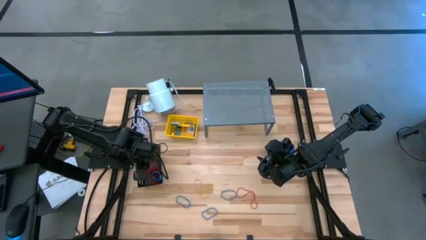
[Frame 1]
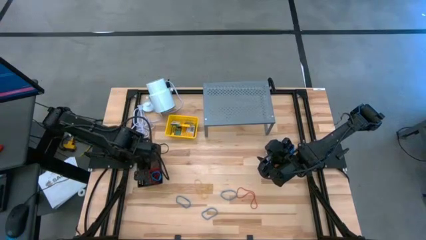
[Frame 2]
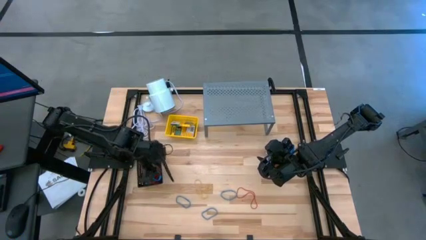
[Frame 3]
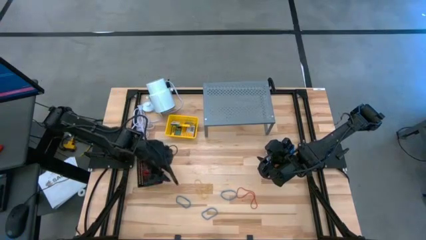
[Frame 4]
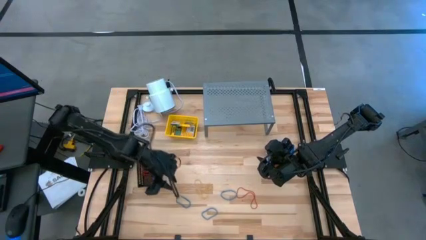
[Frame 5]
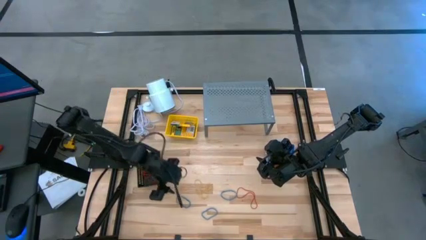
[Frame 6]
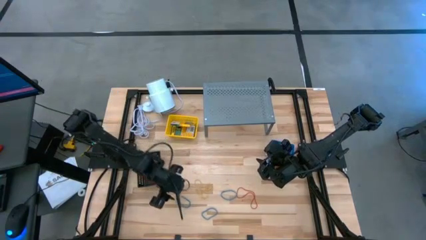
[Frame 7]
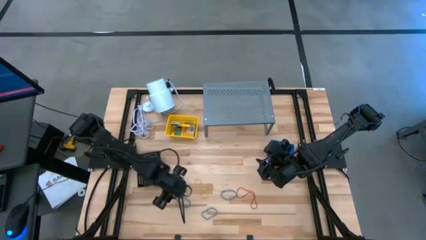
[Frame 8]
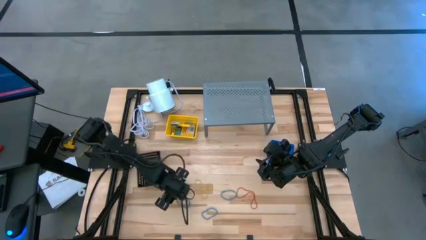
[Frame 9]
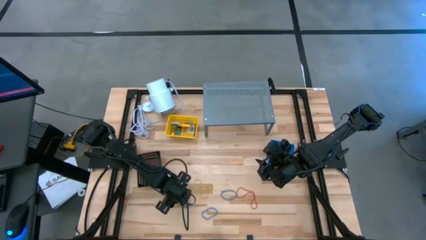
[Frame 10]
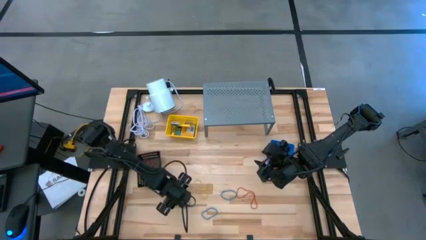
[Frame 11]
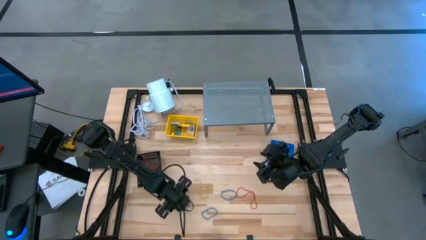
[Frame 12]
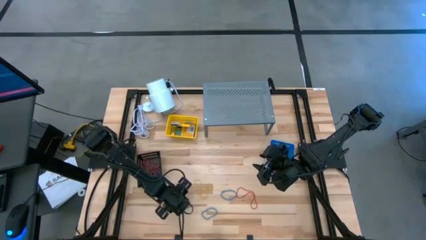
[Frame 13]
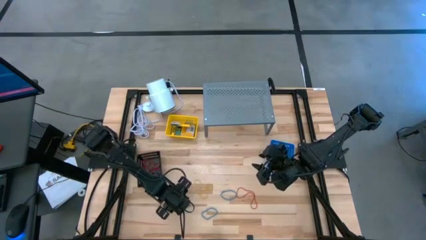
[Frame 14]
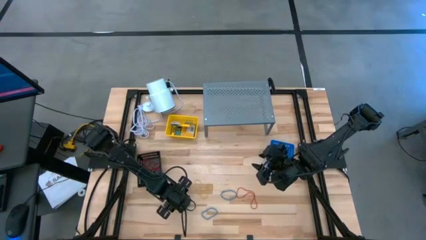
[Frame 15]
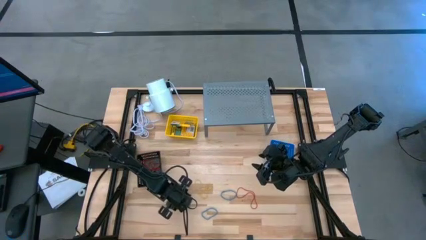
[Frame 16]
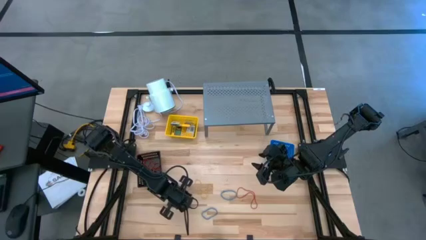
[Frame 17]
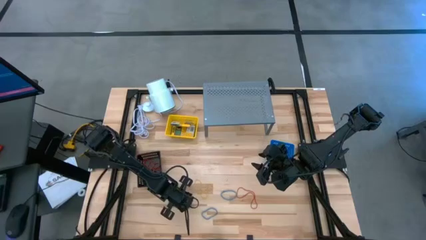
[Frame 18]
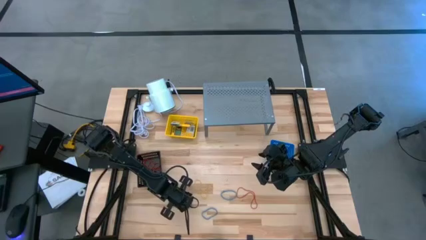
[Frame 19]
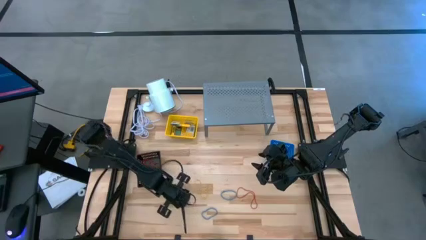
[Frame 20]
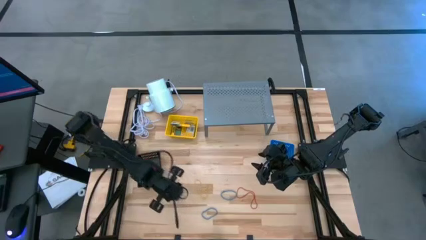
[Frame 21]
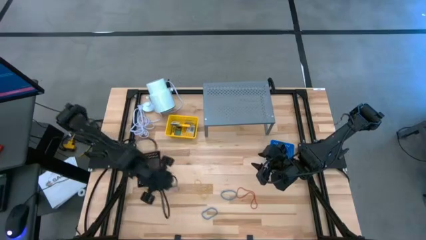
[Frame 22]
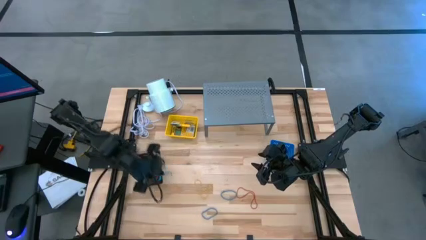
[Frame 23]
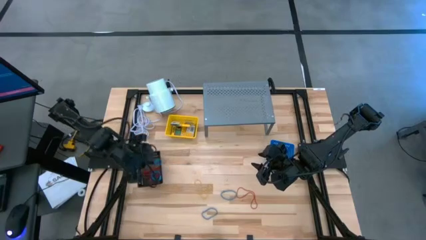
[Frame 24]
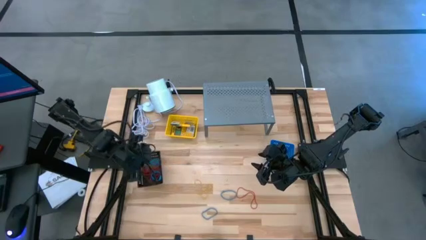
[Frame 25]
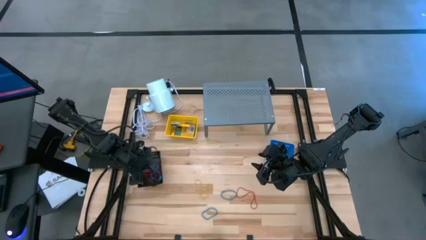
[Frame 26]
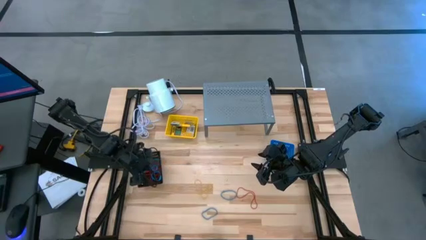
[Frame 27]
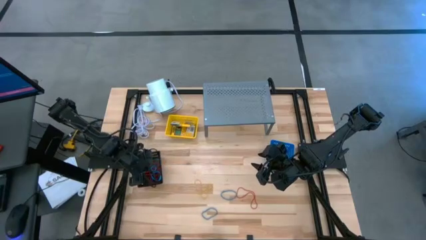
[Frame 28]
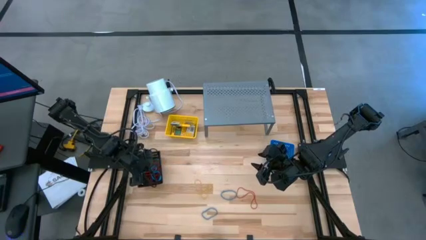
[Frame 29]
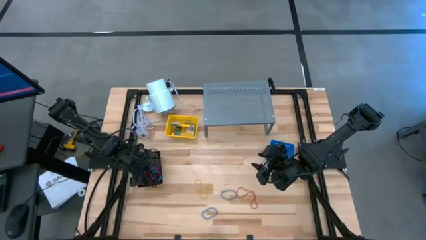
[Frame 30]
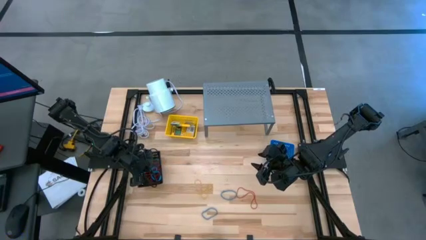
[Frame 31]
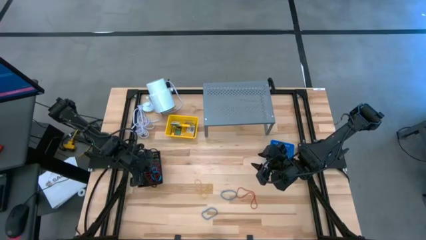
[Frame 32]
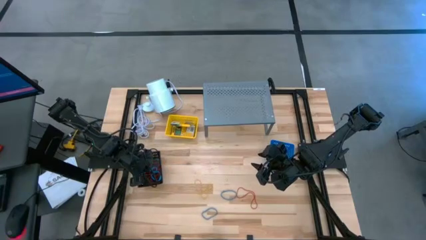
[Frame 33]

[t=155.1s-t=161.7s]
Task: Pick & Place Office Desk Supplies
Put the blue rubber band into the black bin

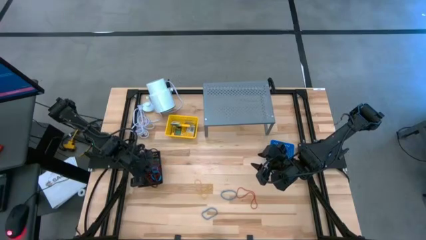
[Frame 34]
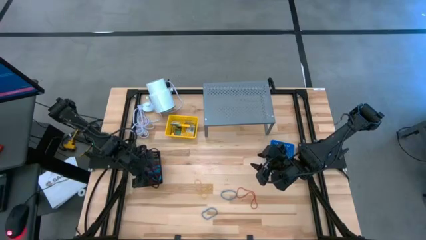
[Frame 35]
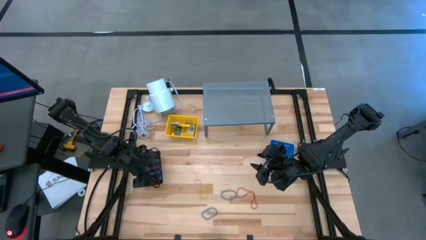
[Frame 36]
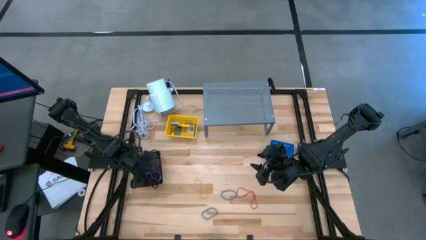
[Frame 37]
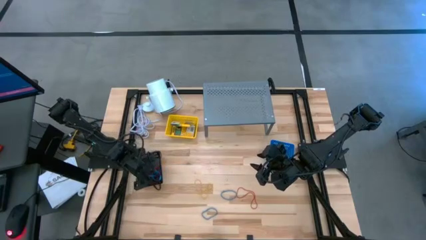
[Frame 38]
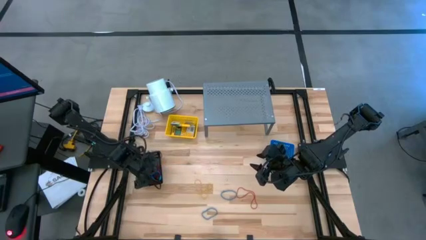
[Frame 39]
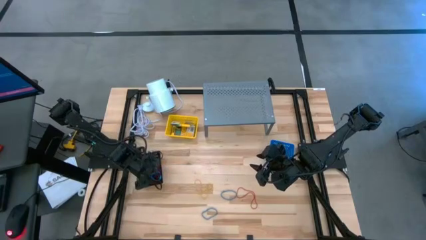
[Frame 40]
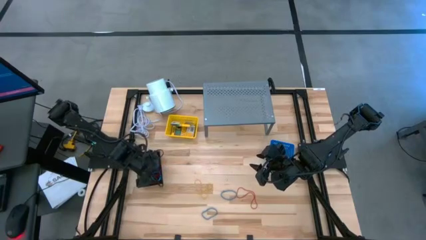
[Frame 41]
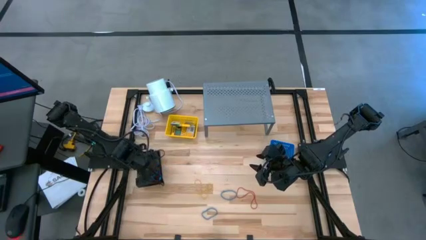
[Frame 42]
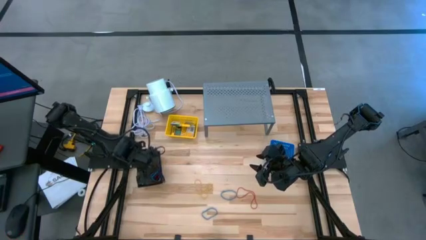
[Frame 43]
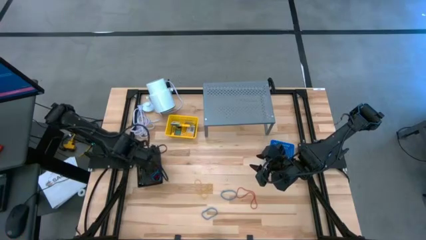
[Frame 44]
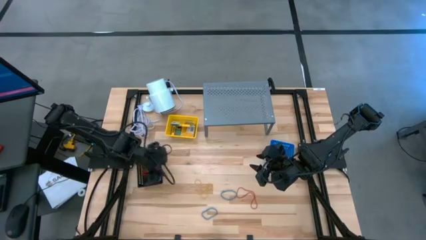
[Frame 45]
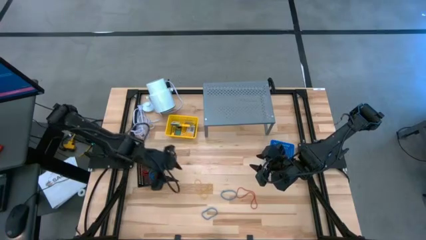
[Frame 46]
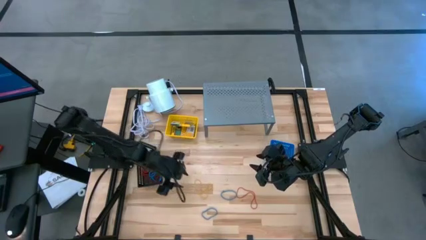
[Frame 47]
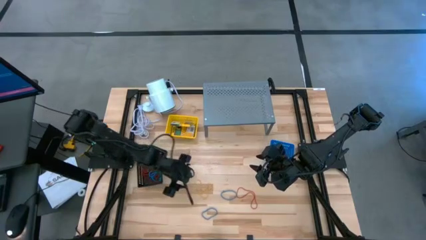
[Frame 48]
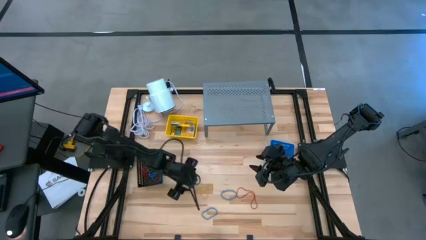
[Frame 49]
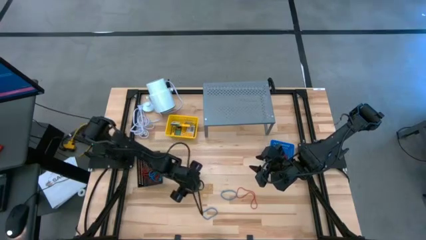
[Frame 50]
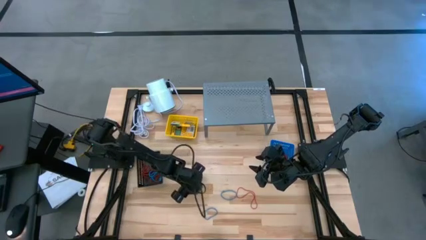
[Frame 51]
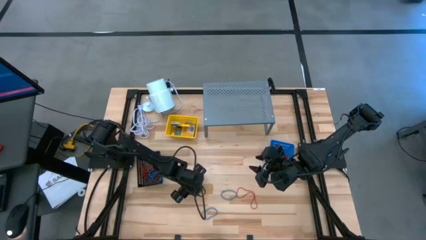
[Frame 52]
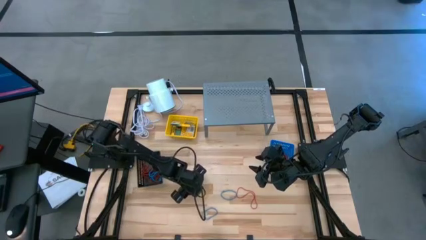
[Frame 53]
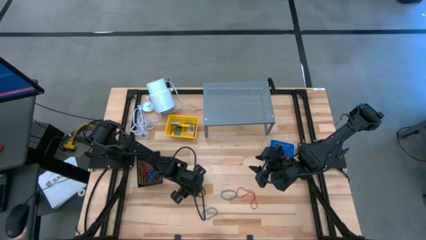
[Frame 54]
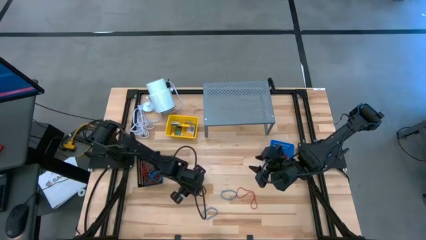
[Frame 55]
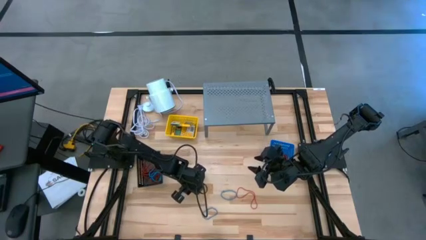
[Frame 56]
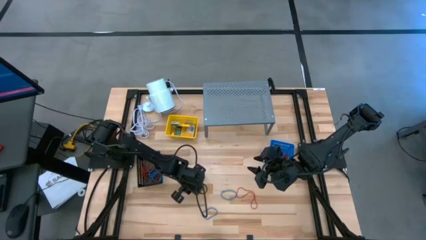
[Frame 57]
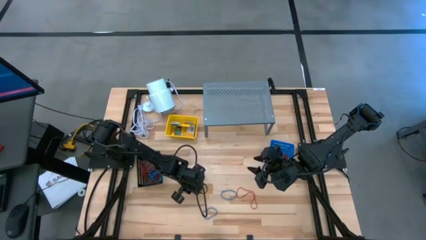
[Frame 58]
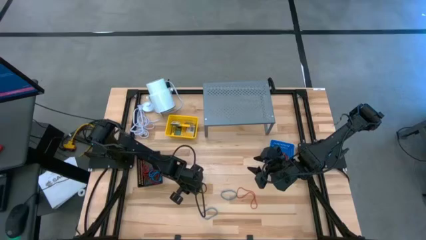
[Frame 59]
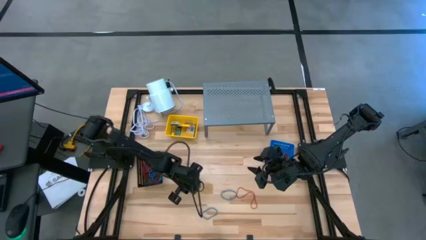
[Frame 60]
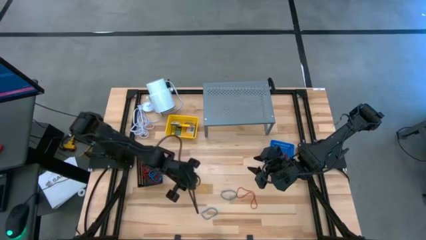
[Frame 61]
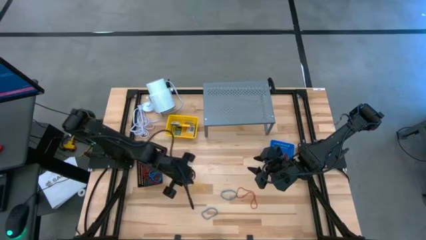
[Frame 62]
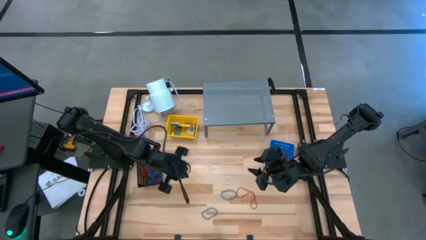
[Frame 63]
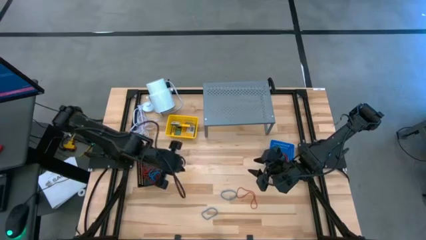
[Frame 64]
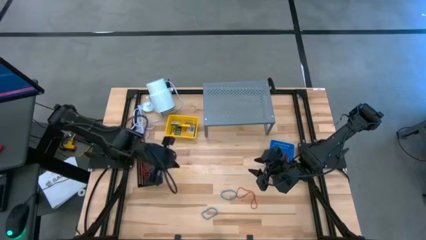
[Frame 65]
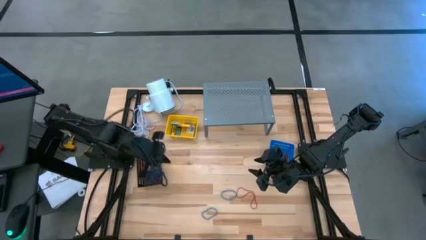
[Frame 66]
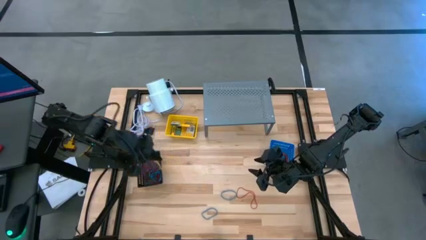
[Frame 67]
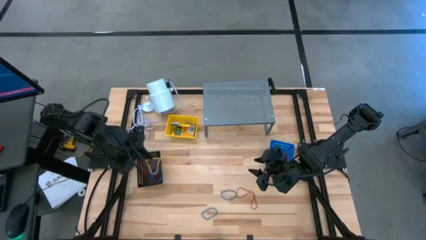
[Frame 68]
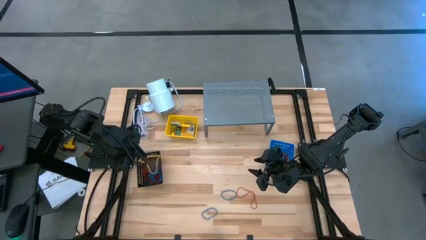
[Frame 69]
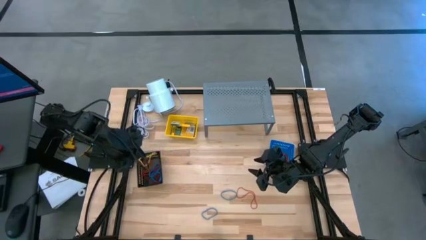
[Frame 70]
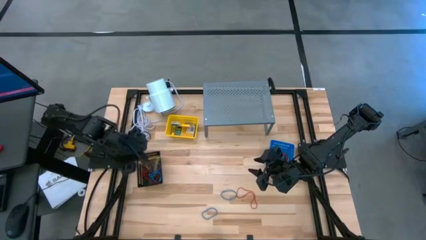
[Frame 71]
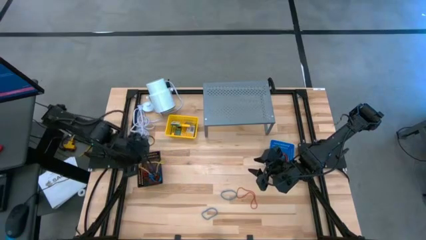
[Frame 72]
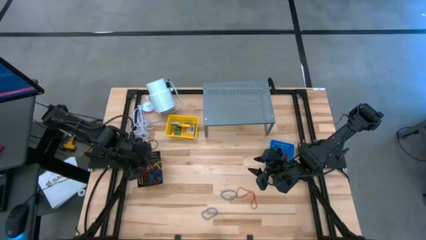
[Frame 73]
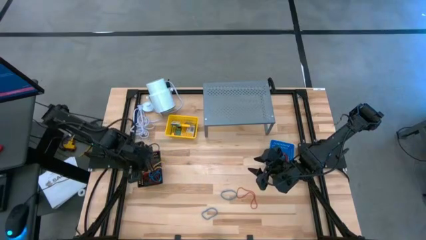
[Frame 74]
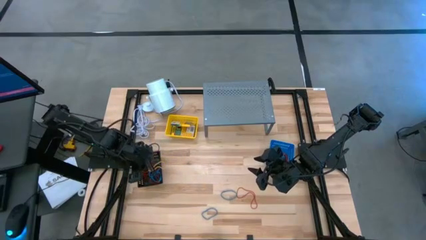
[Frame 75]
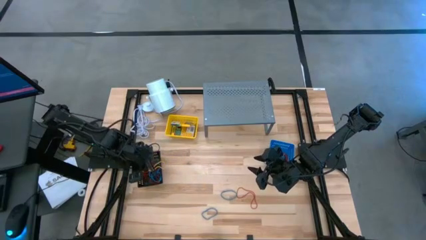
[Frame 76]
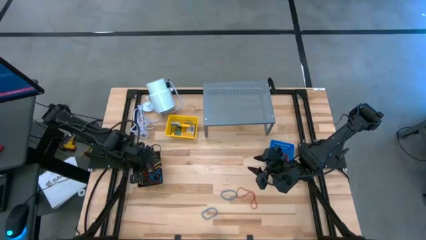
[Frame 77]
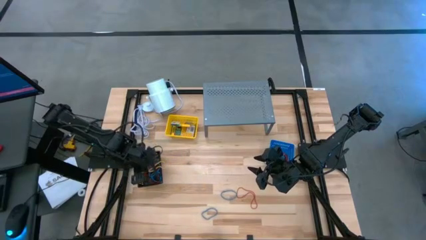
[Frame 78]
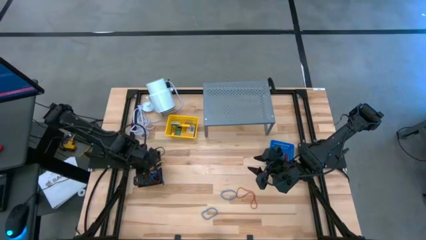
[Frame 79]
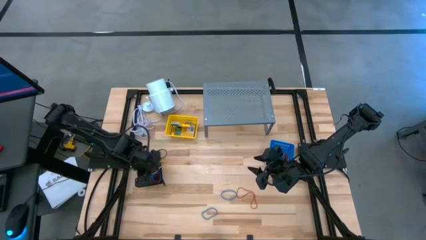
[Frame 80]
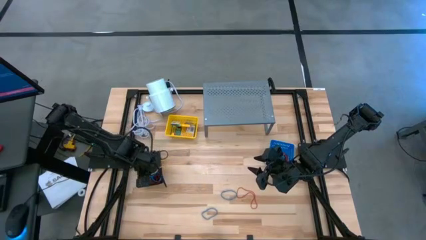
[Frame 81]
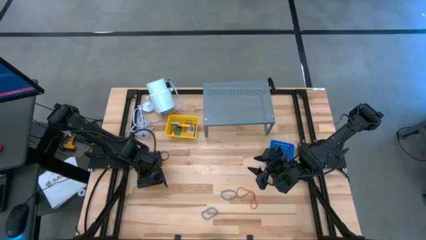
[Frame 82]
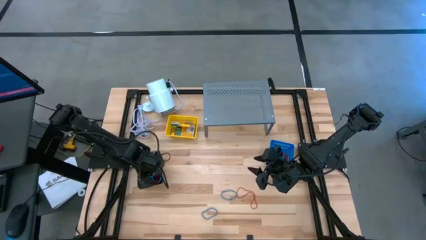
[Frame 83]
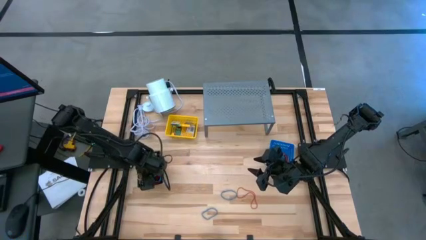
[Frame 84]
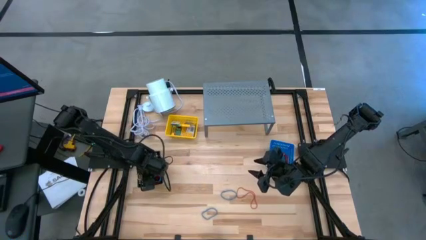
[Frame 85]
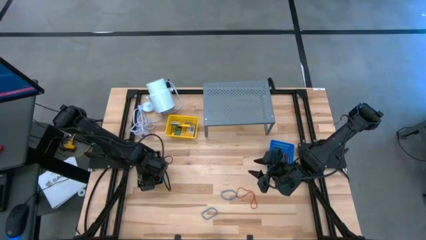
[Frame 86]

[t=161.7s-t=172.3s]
Put the yellow rubber band into the black bin
